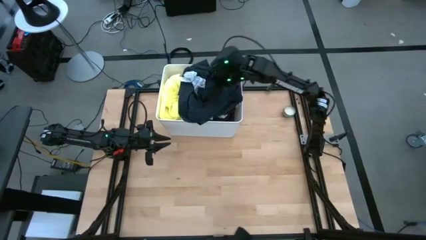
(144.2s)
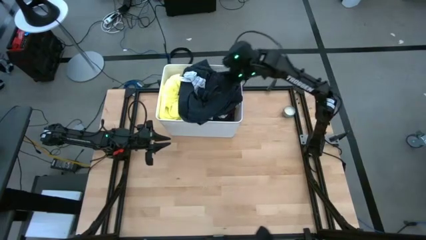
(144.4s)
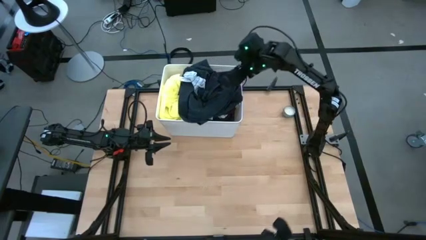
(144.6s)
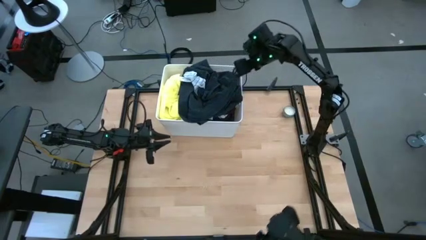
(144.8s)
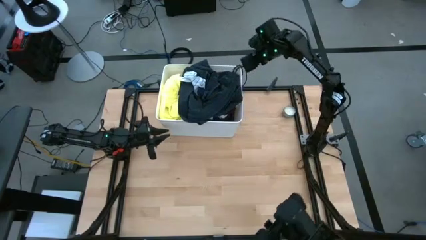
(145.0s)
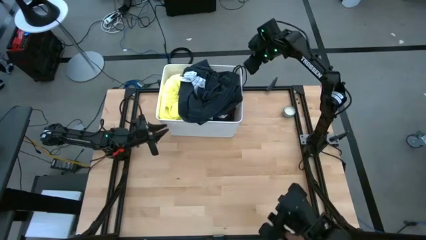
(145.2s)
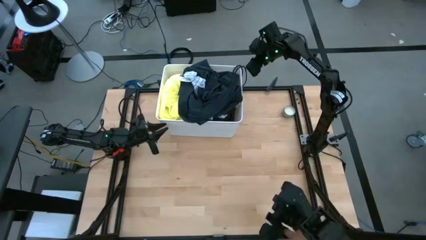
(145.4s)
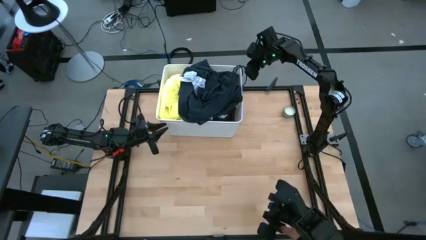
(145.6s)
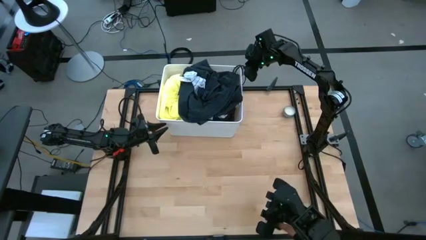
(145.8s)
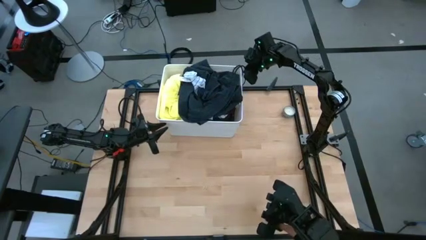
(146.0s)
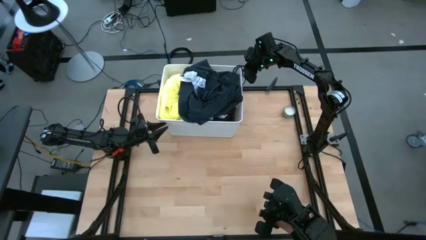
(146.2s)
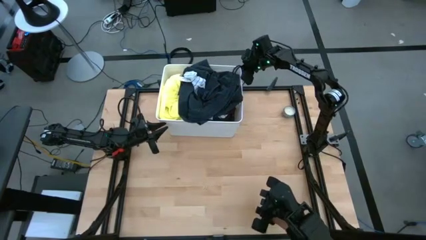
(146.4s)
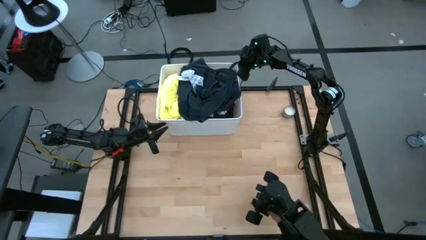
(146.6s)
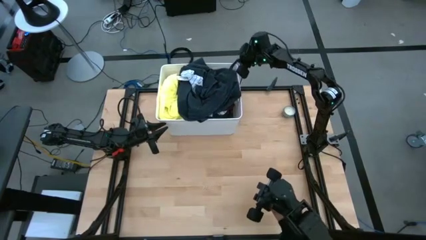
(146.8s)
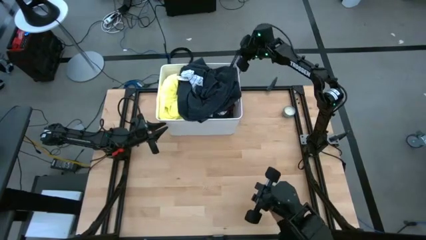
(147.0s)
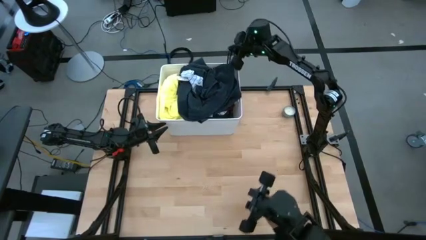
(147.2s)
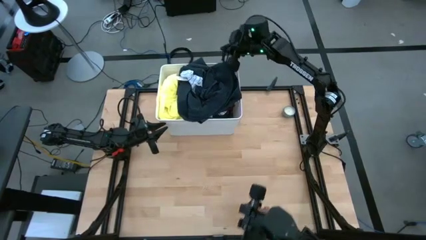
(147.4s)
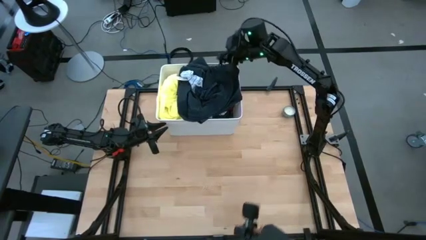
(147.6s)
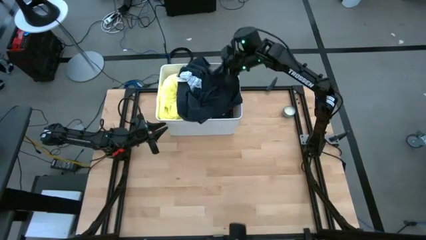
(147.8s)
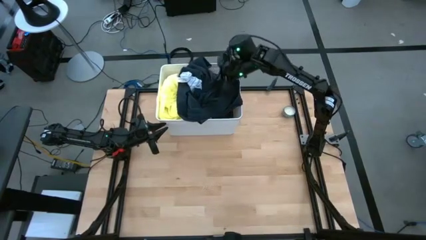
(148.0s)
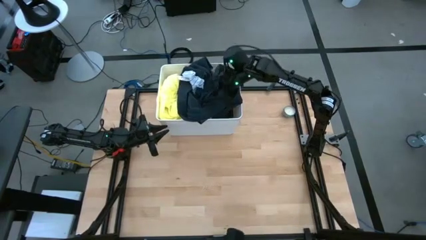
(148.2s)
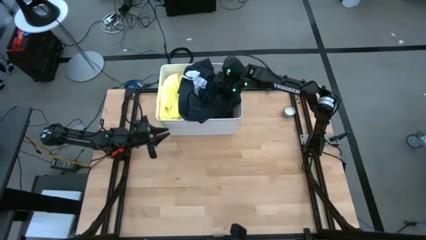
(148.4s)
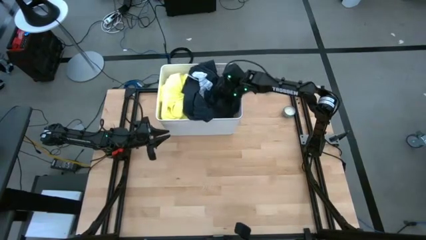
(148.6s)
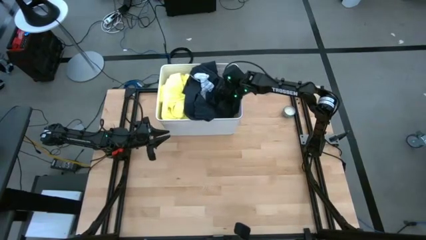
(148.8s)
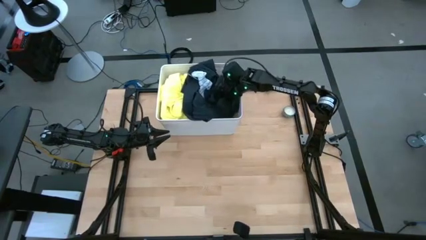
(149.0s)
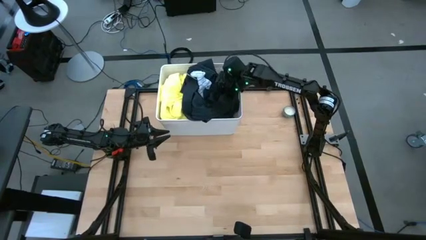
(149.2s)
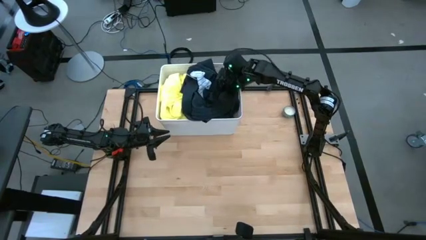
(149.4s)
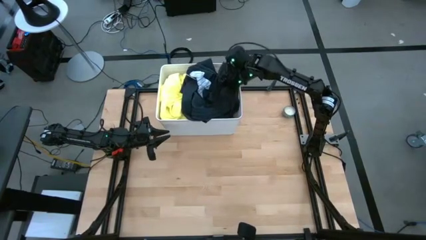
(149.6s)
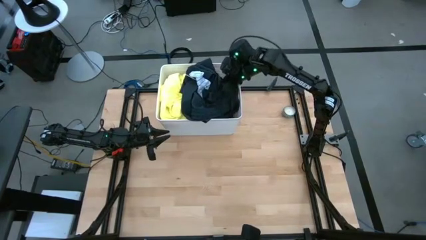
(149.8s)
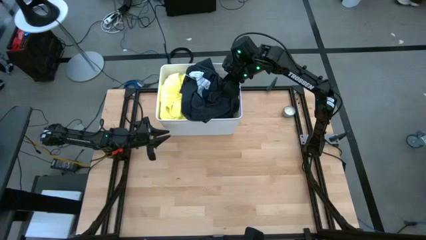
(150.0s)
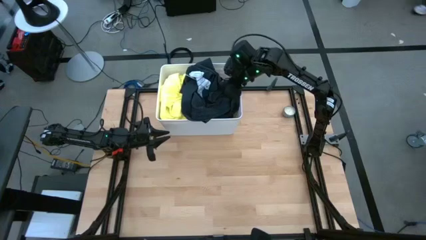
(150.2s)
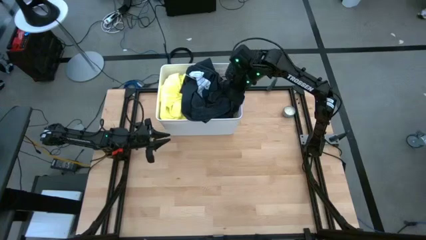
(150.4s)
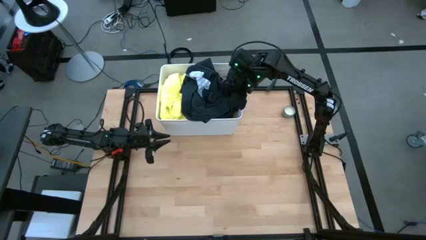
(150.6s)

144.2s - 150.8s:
Task: Sort clothes
Adjust the dark green sports shorts in the laundry organizer

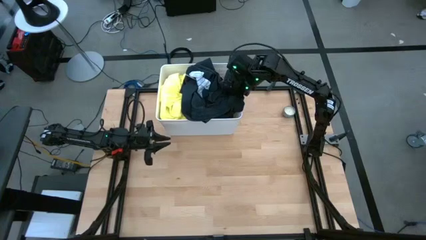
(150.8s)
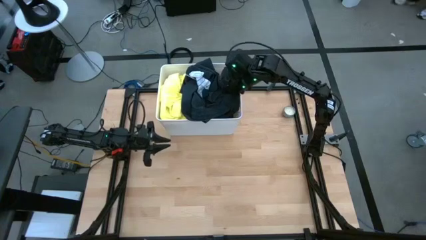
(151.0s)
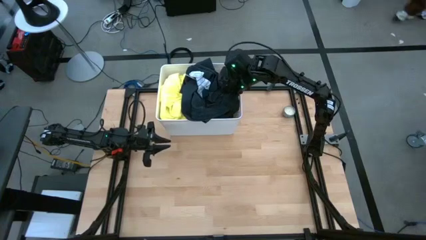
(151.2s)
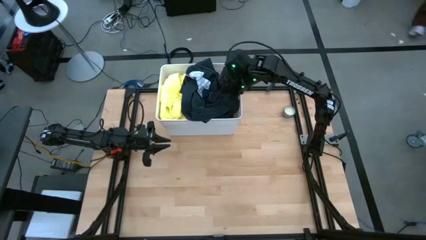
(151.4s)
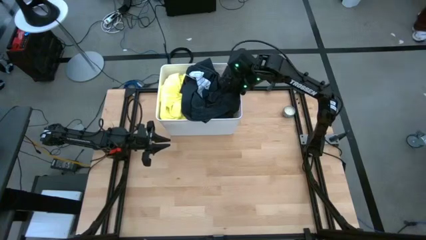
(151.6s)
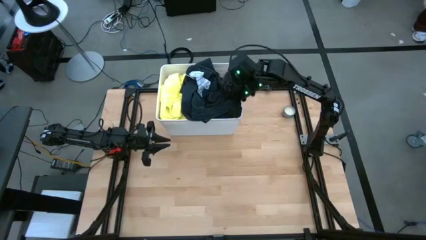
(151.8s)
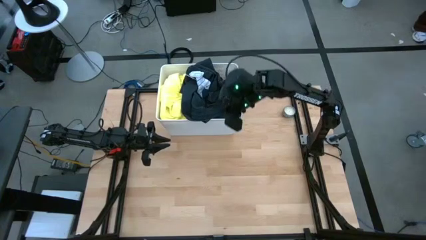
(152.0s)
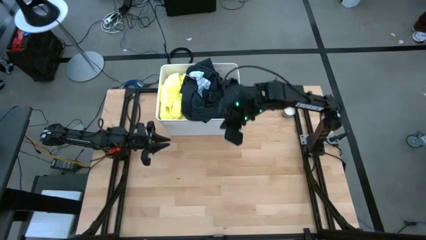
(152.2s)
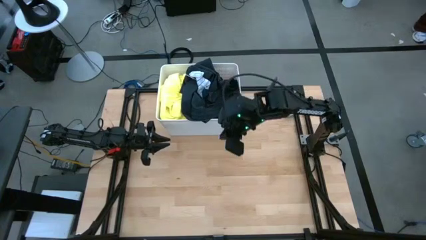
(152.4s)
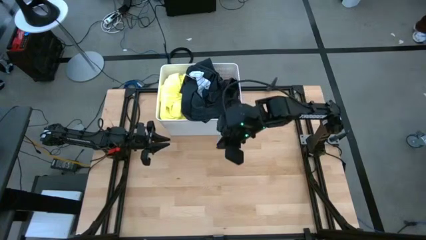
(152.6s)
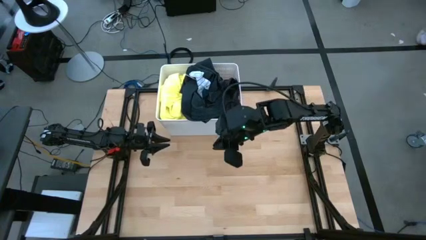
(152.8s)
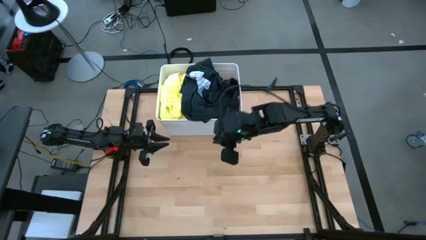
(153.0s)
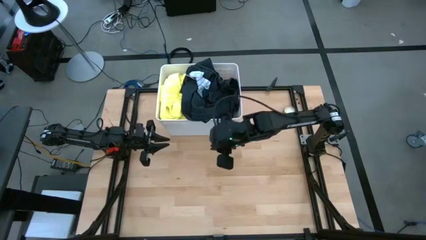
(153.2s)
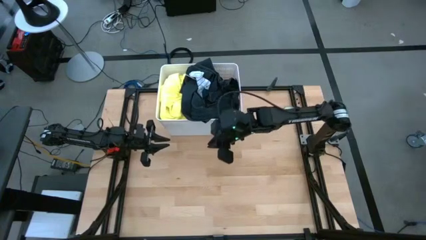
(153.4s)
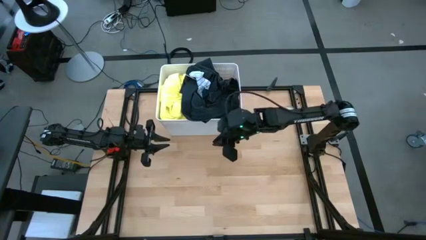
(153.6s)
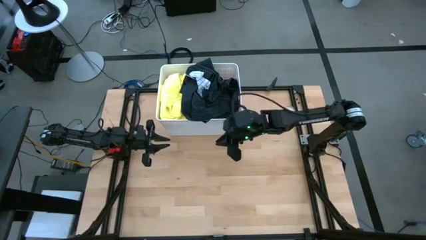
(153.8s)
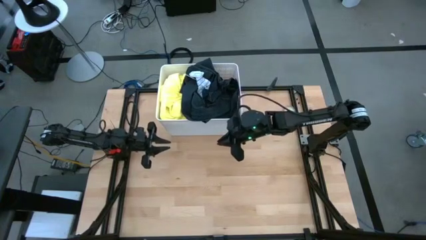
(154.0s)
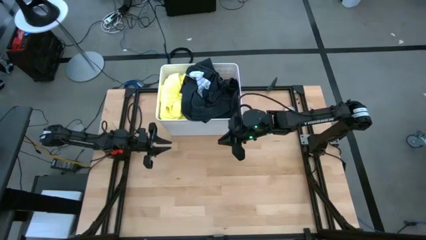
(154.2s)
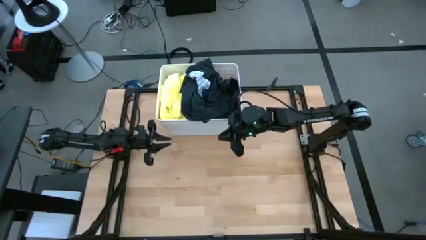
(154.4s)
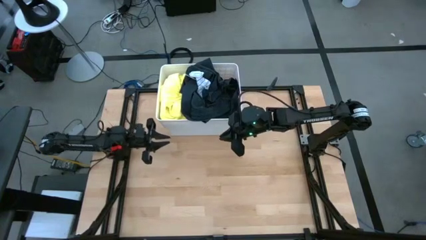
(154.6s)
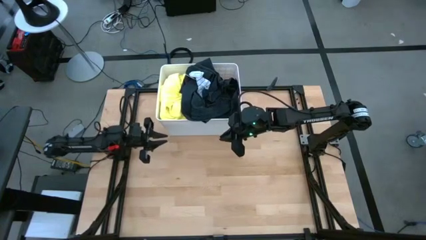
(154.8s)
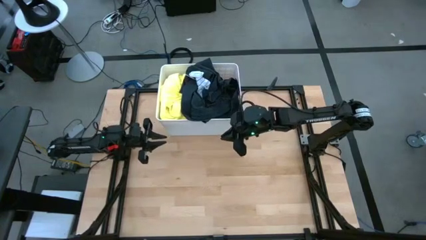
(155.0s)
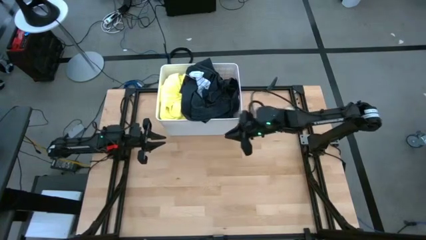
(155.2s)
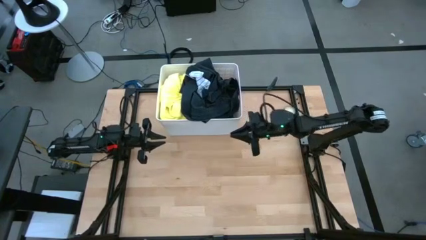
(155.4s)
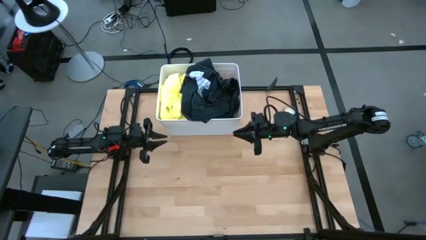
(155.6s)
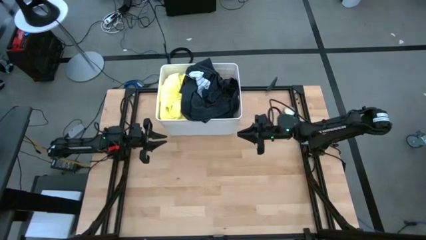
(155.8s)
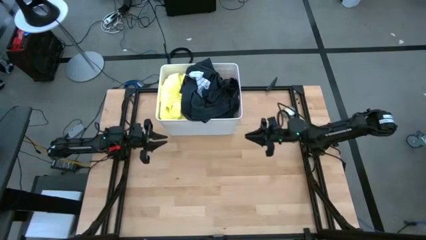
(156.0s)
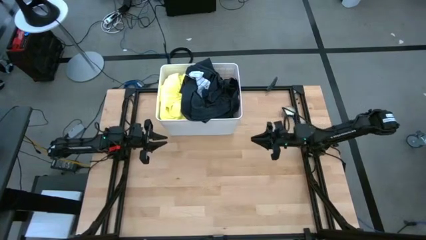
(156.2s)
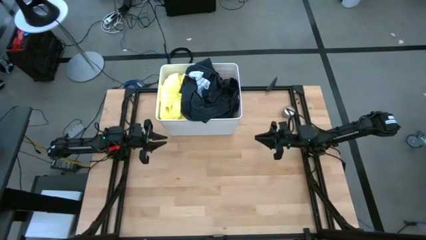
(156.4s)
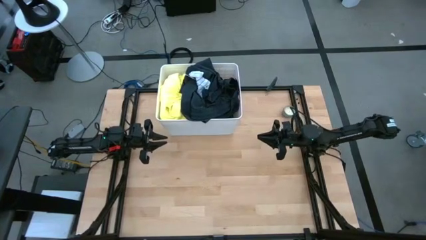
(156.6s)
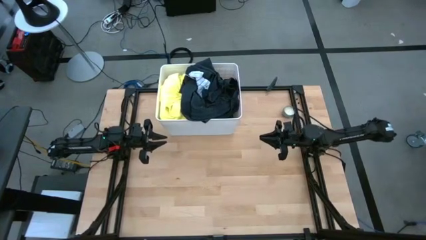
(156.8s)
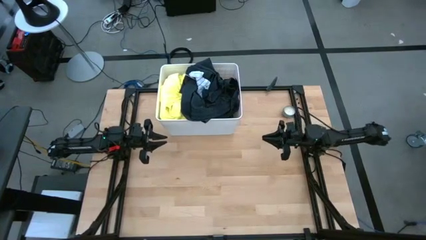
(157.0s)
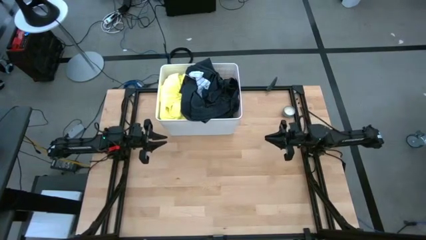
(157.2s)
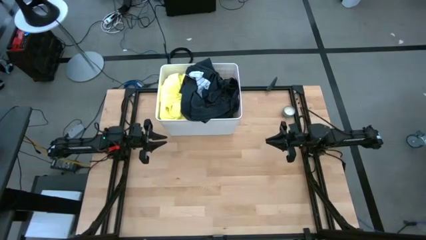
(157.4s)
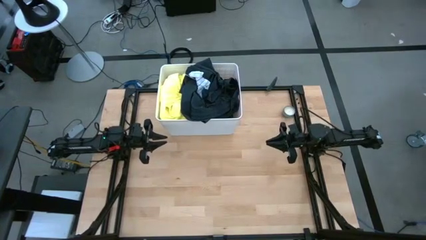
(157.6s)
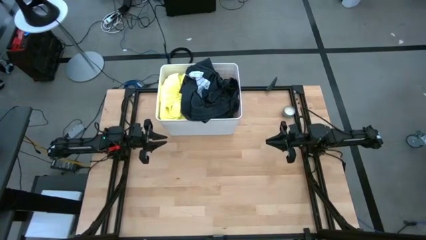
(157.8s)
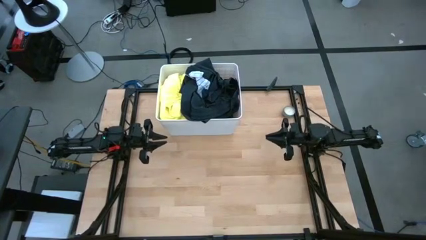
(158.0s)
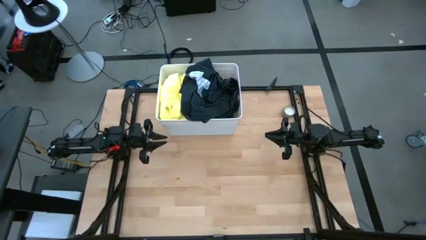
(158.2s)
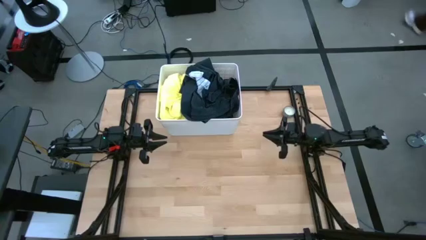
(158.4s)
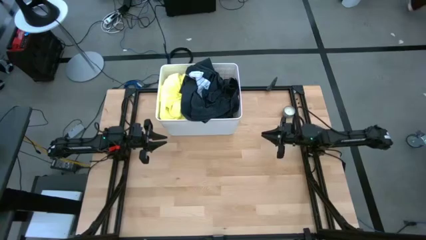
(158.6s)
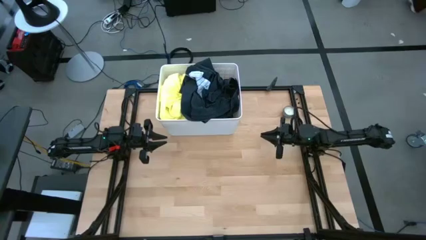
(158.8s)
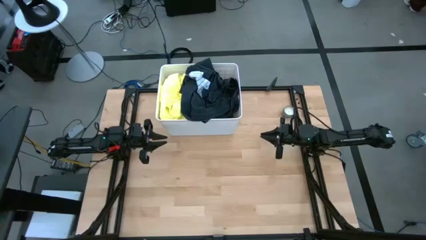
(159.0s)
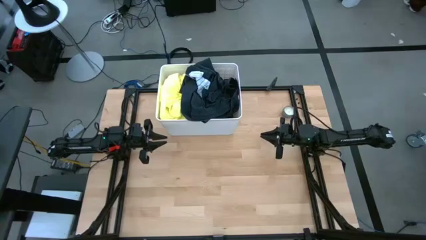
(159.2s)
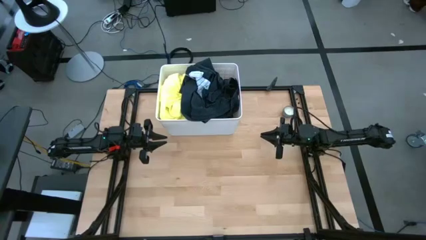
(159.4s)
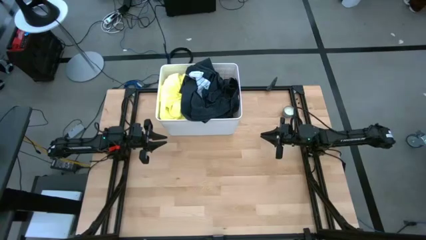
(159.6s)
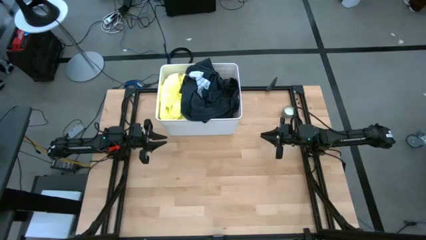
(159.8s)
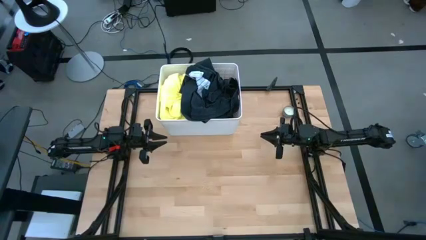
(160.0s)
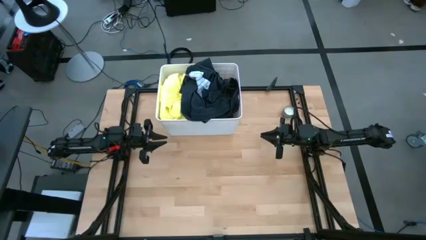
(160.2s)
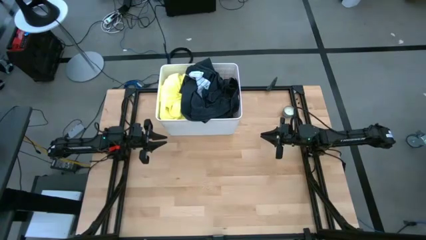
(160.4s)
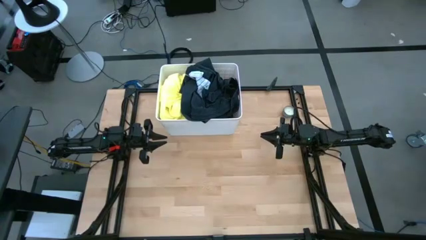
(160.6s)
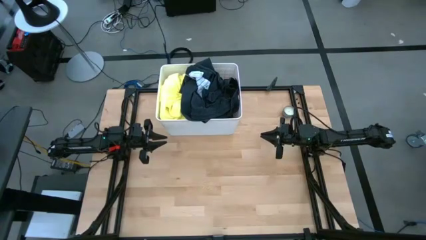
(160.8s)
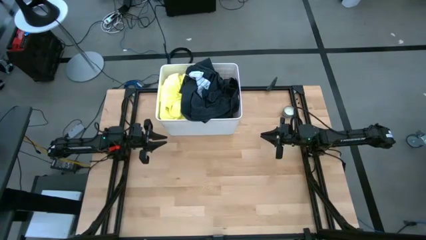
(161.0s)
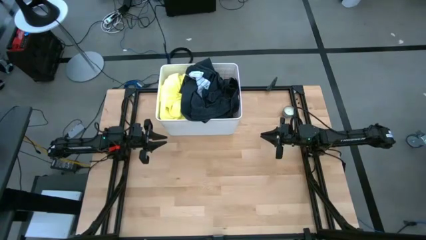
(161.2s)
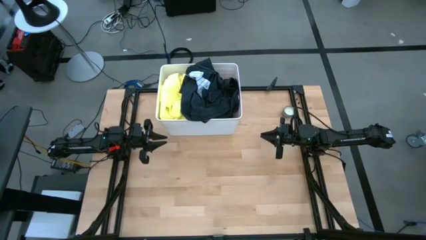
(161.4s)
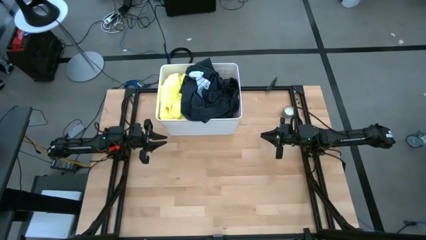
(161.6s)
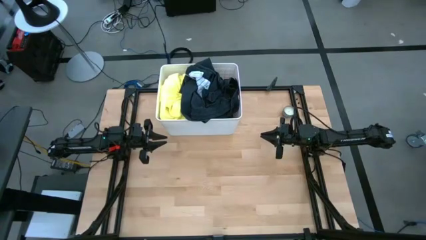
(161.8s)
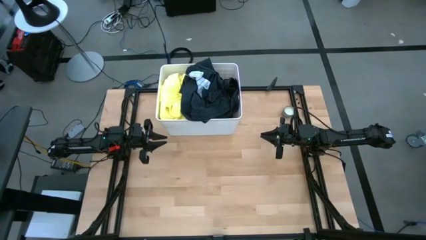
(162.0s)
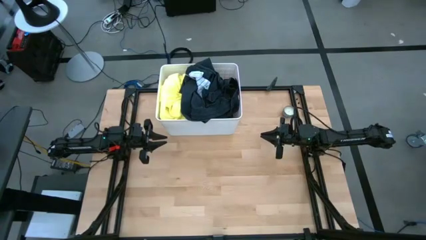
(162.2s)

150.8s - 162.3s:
Return to Home Position
